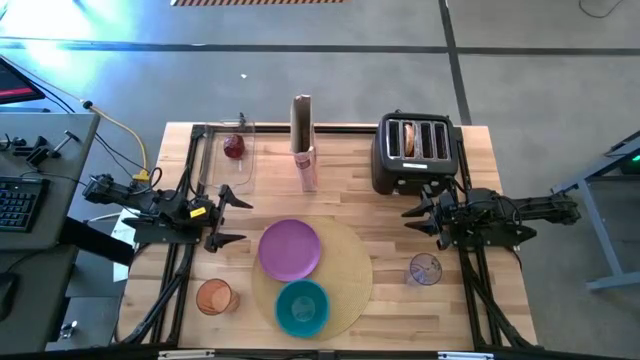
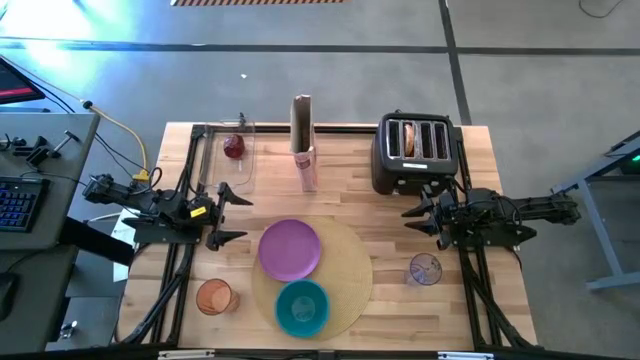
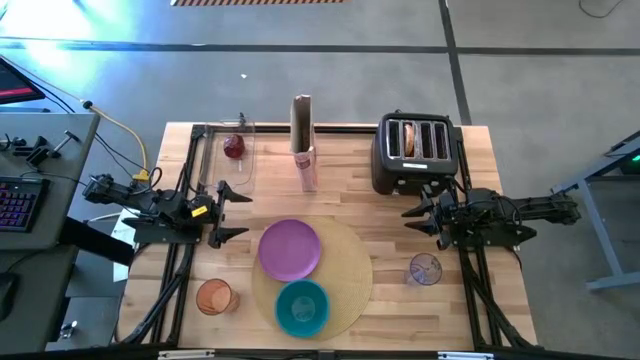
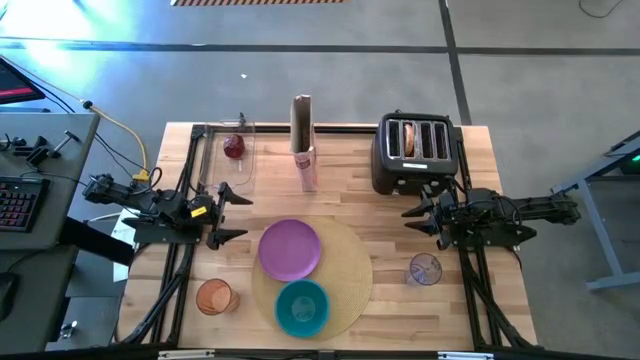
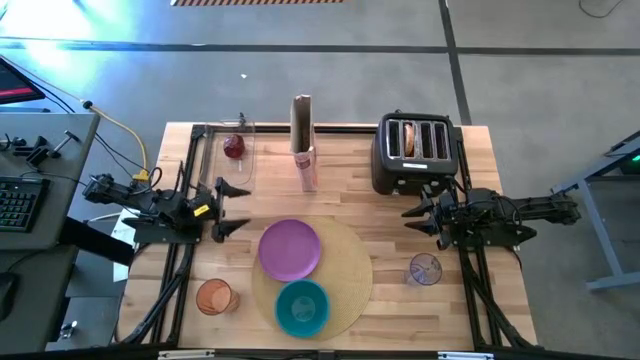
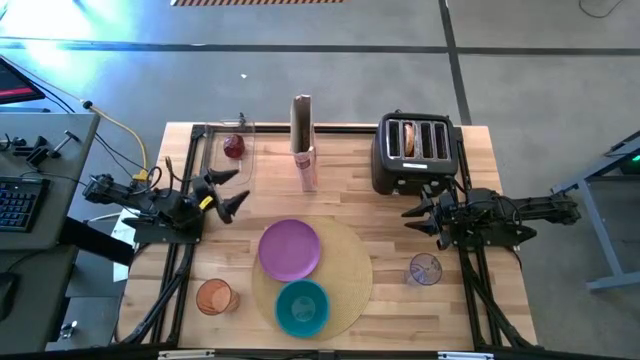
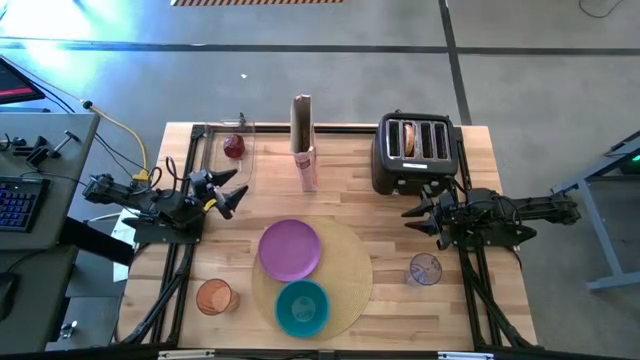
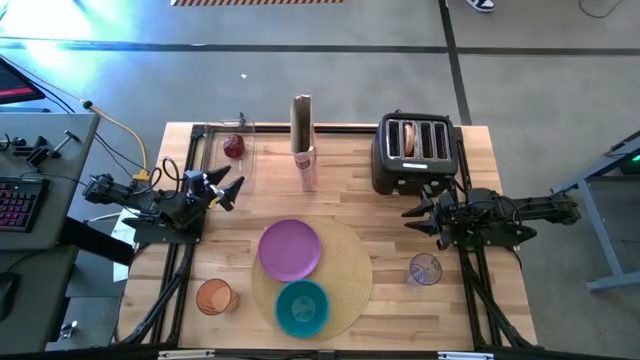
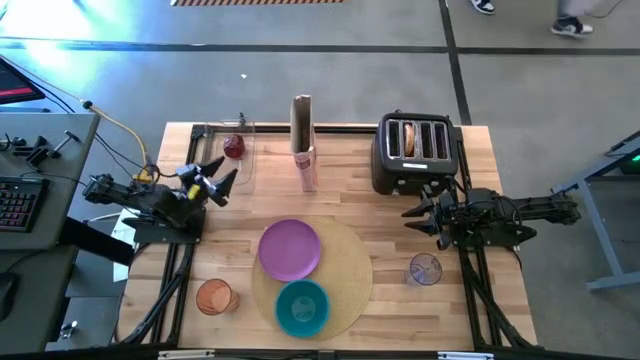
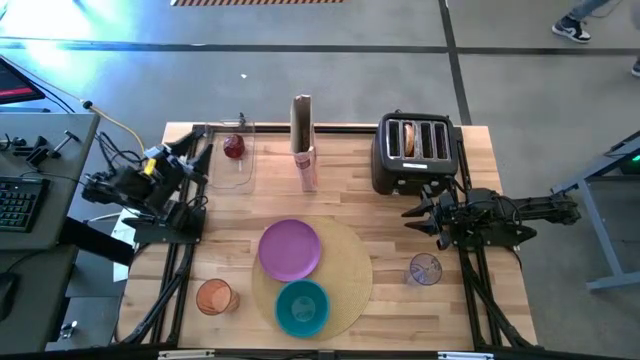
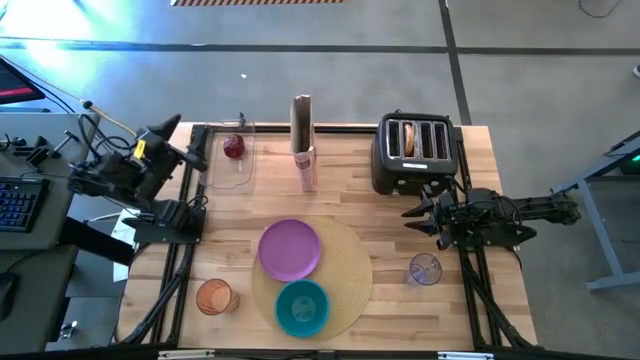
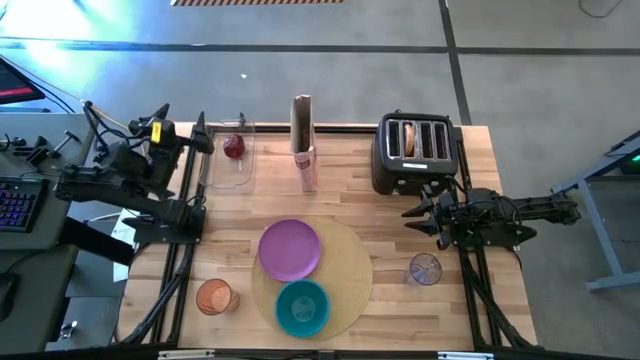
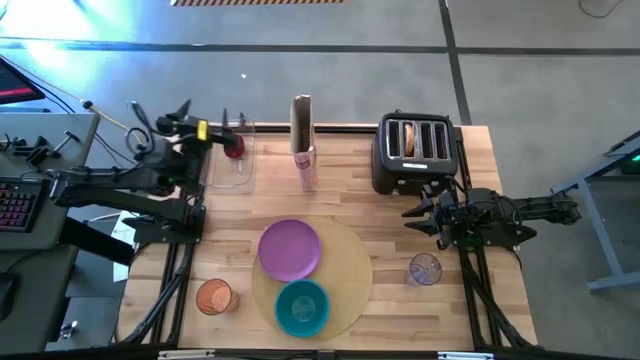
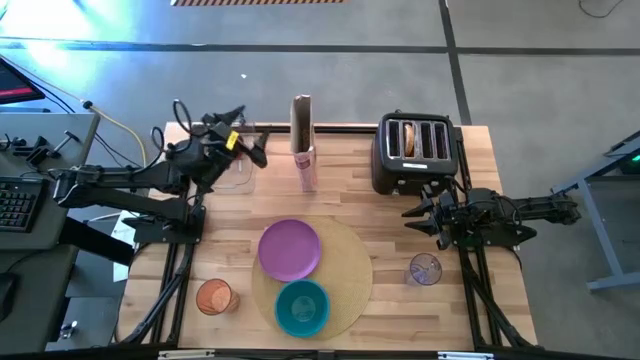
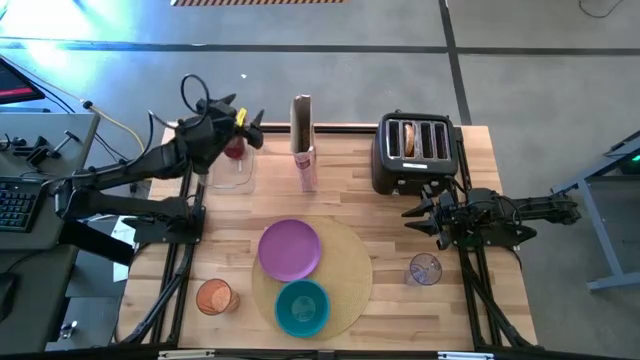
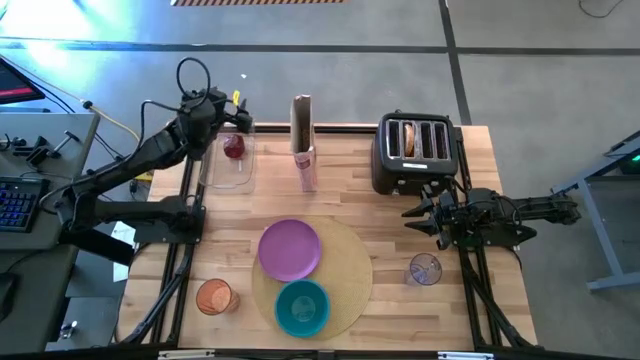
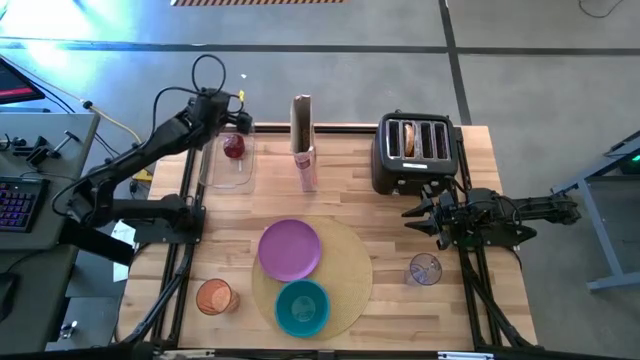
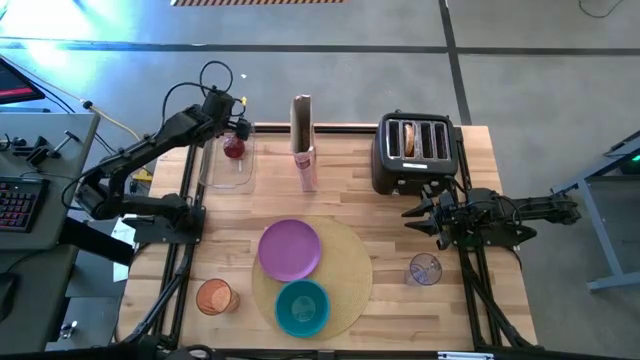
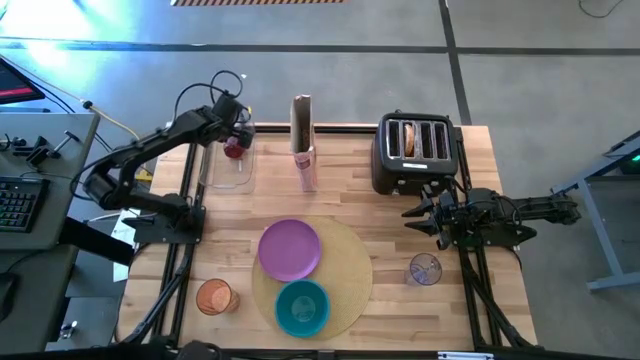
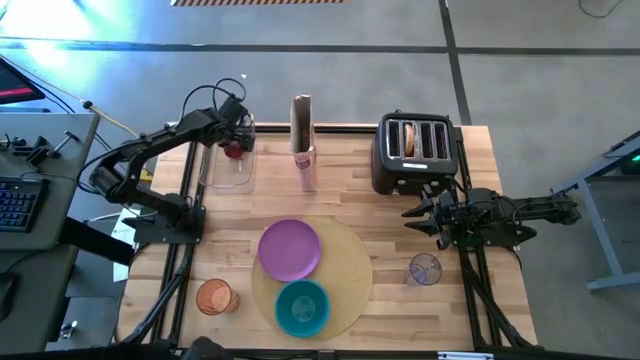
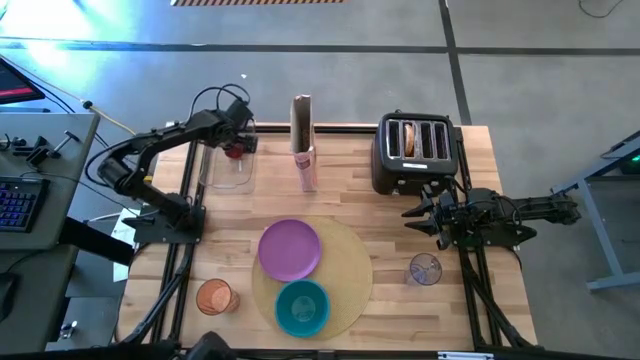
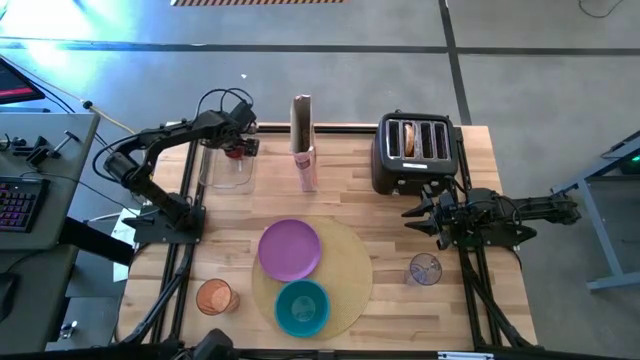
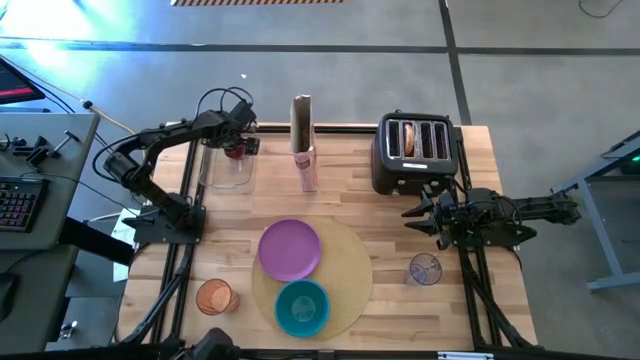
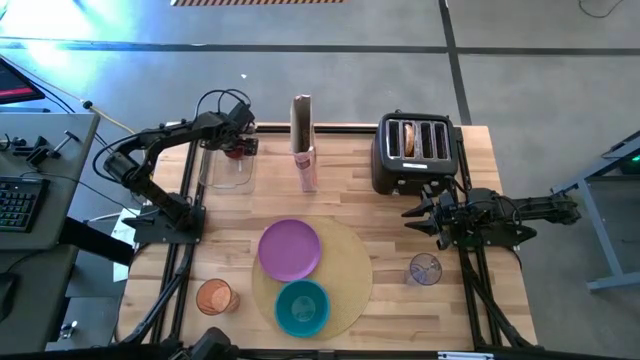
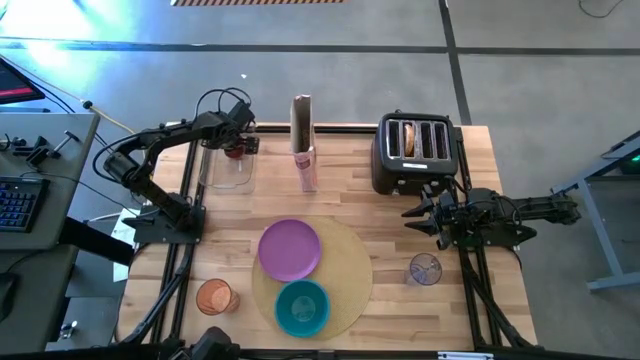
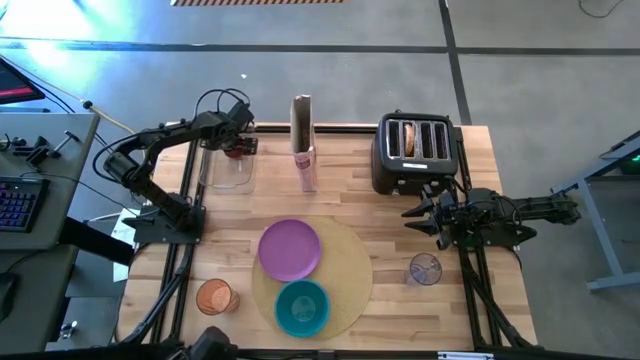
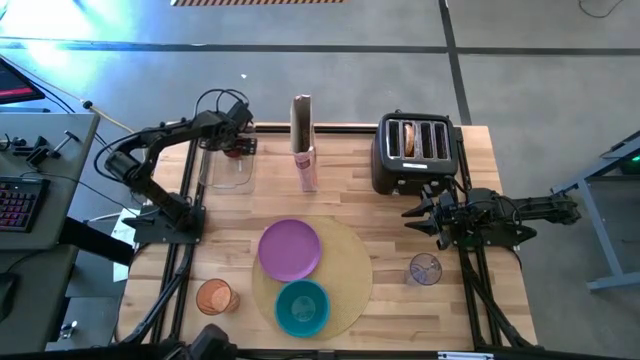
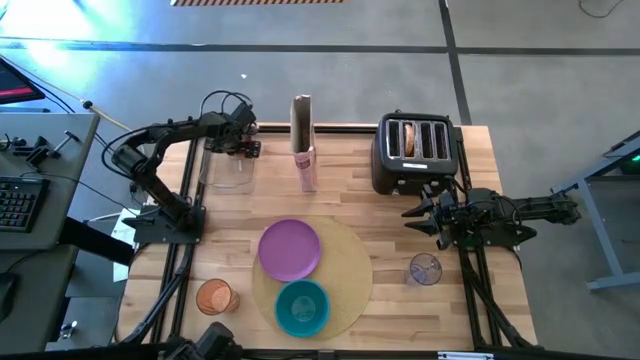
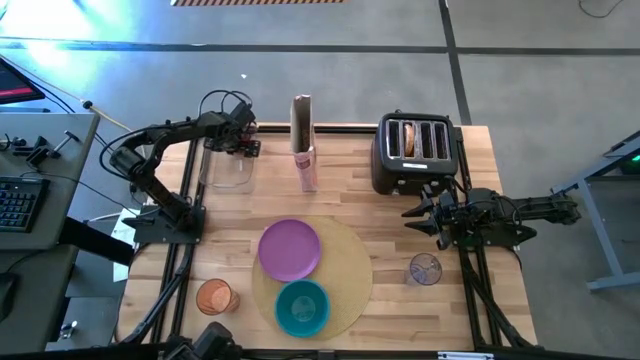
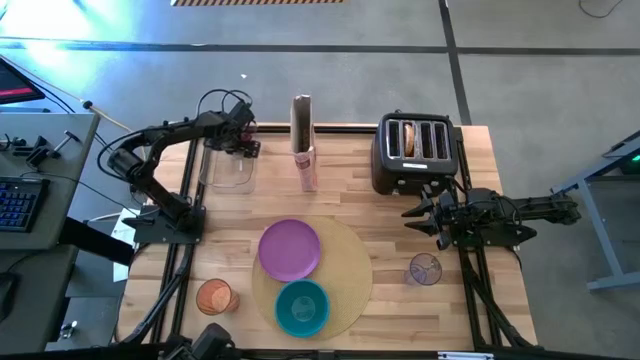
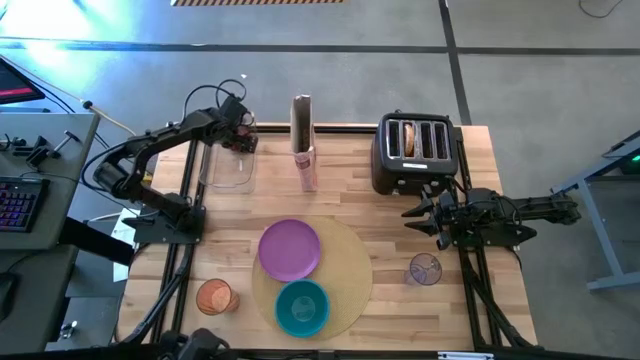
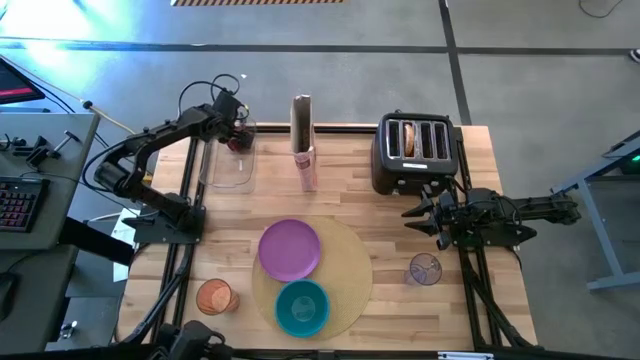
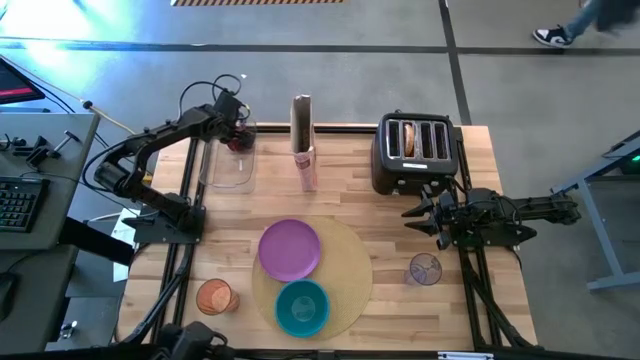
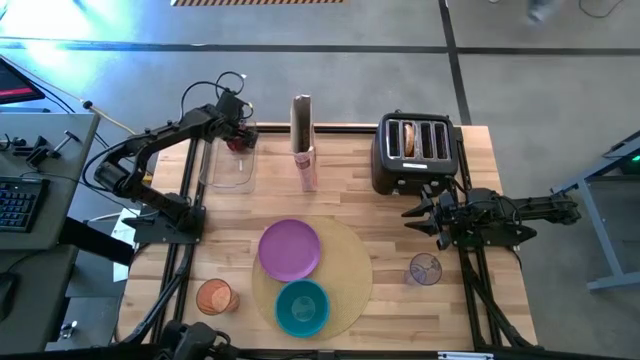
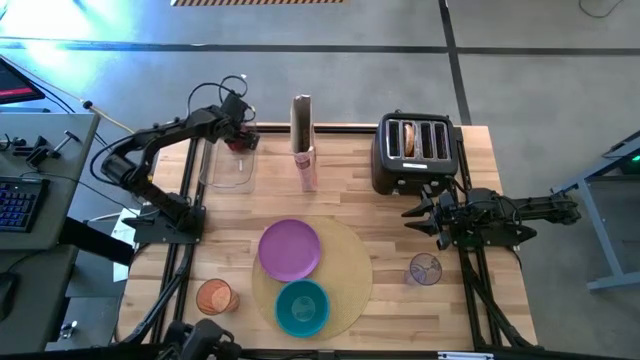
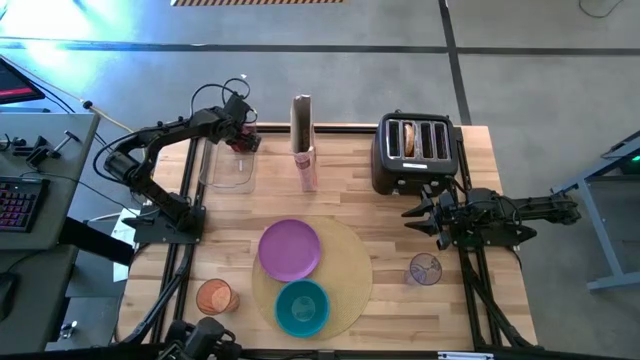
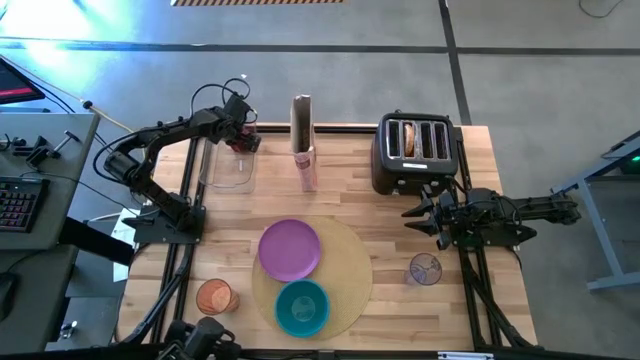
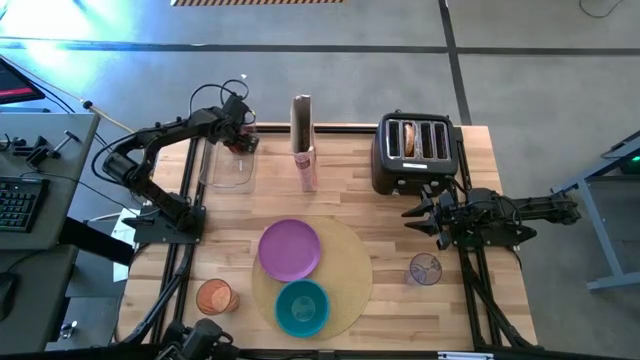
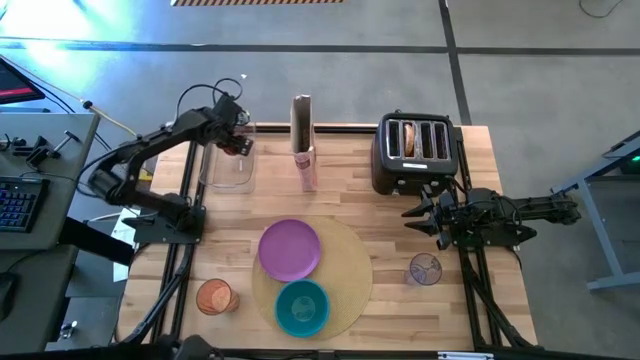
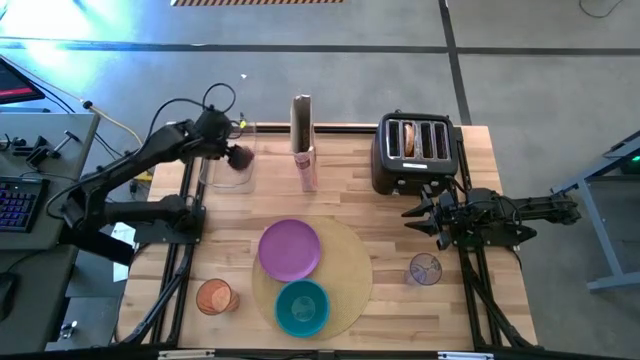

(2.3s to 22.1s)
Task: Arrange a breakfast setting
Put the red apple on the purple plate
